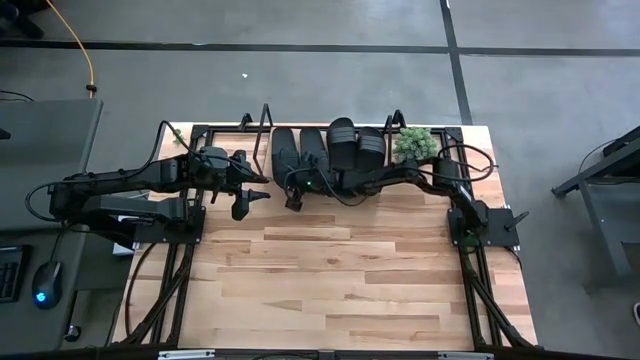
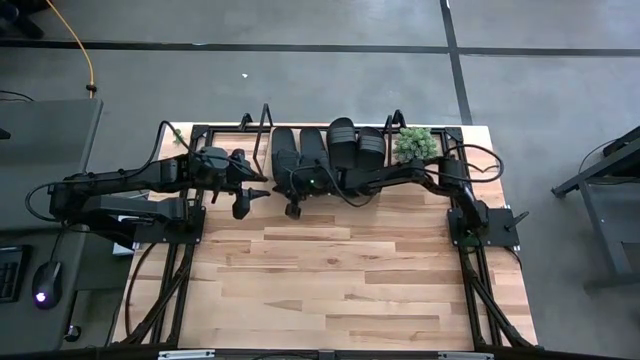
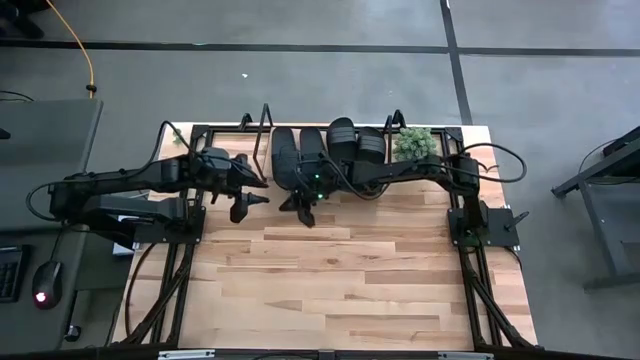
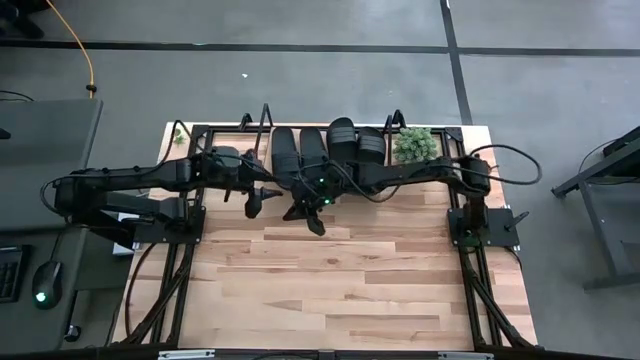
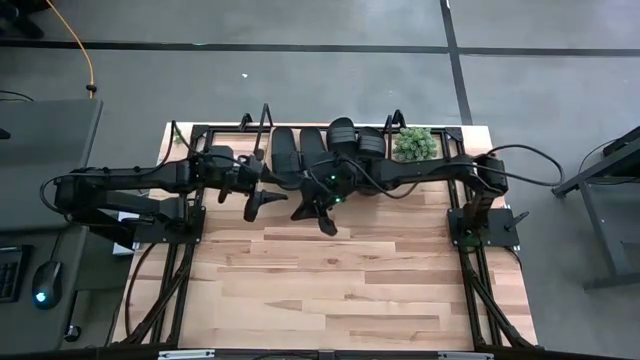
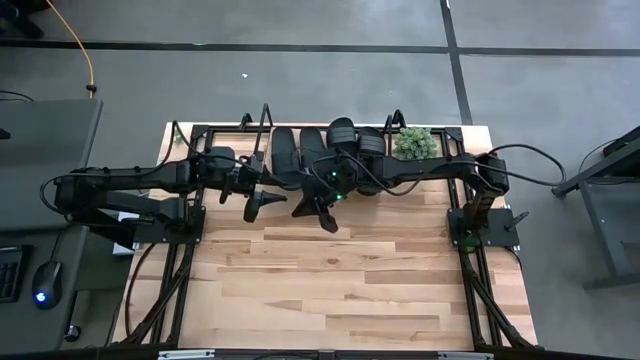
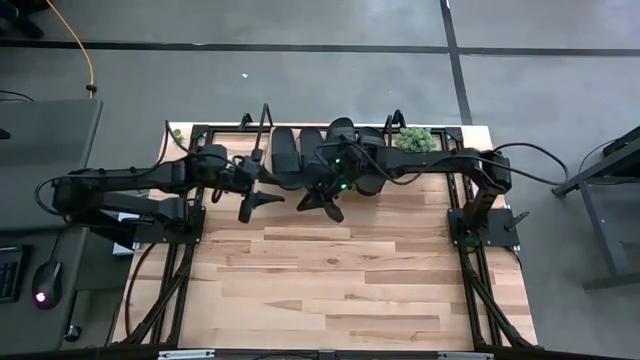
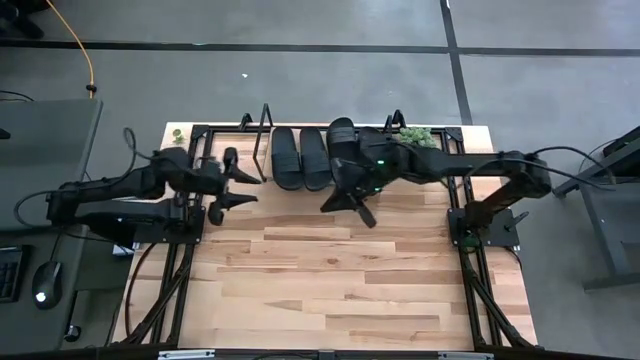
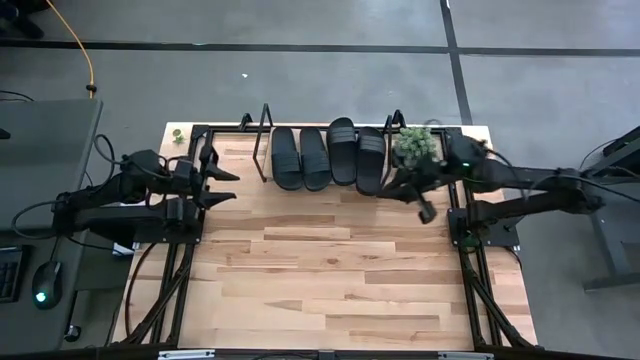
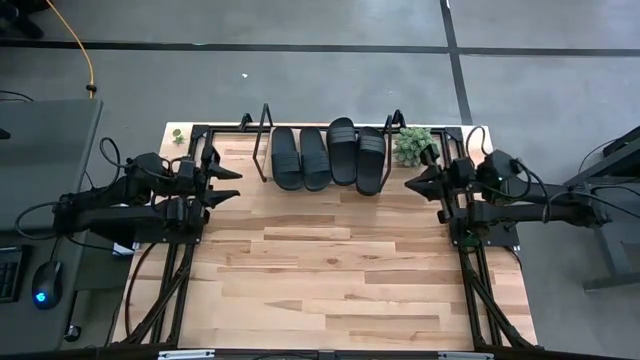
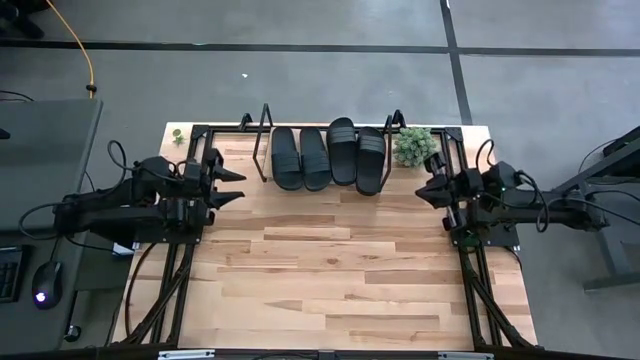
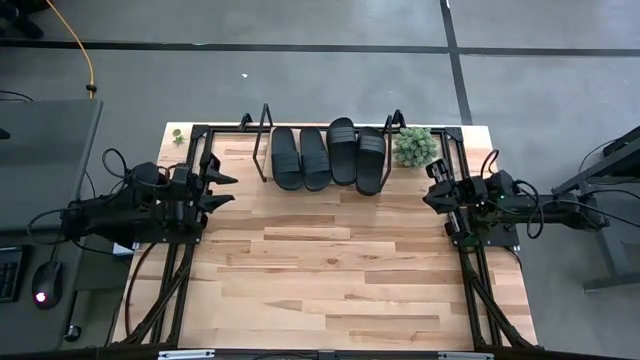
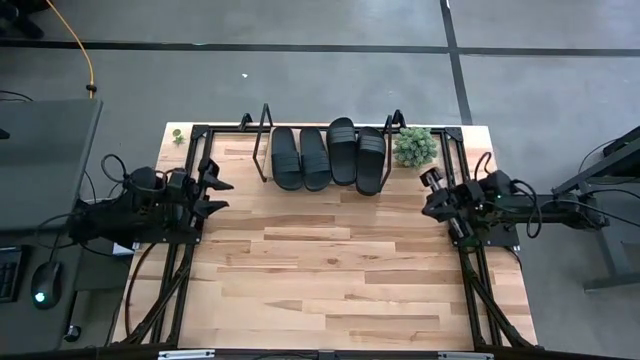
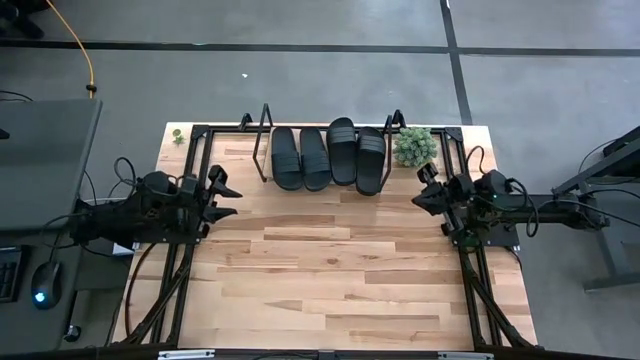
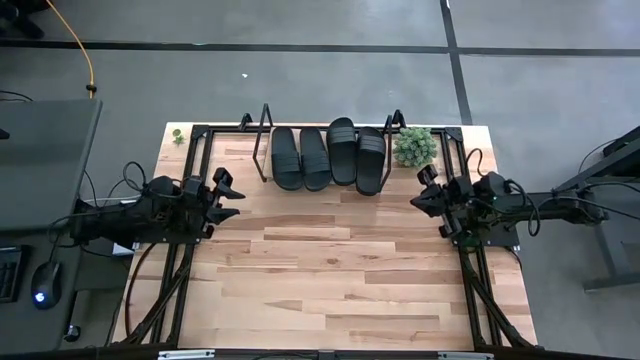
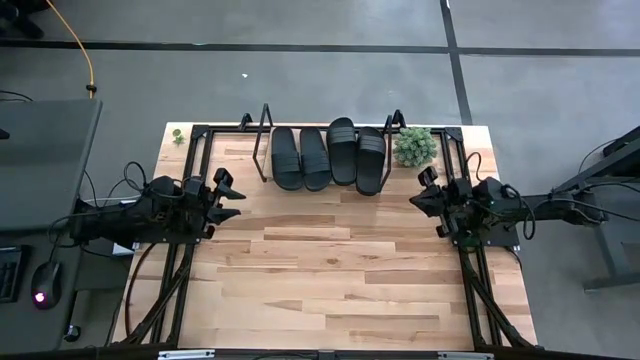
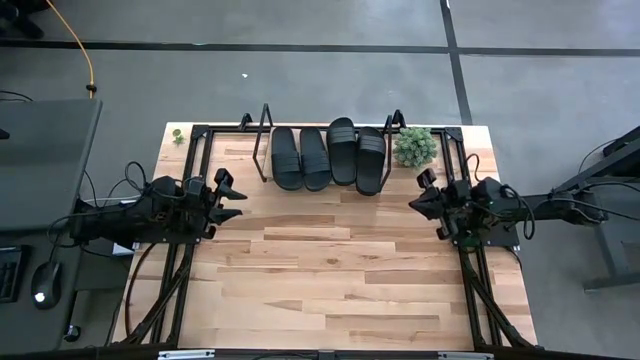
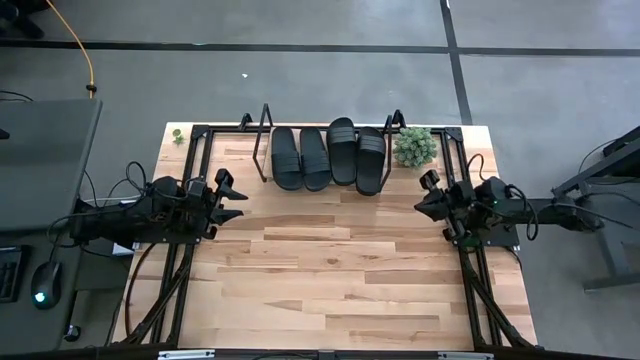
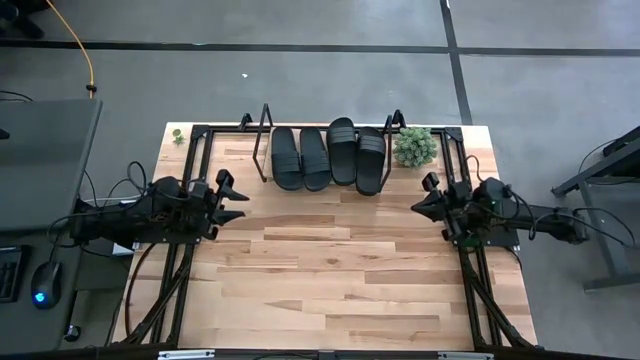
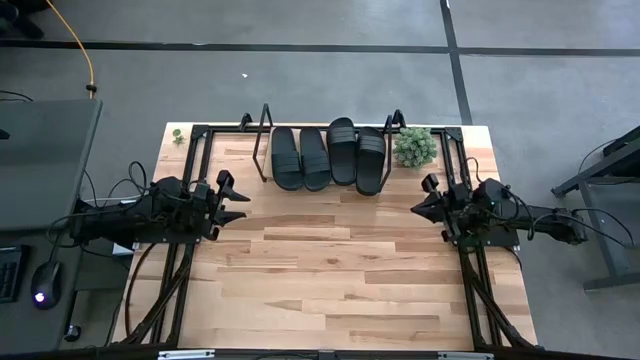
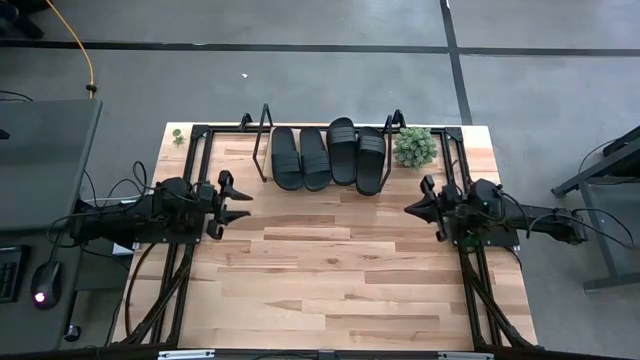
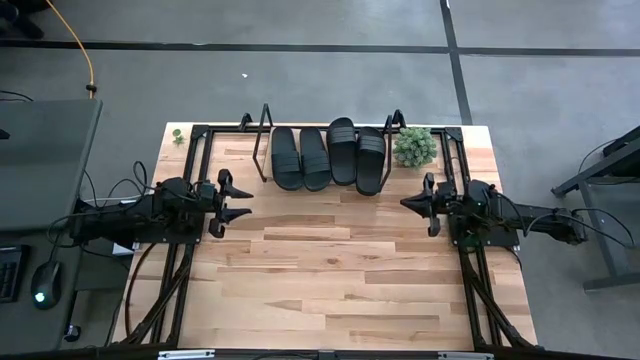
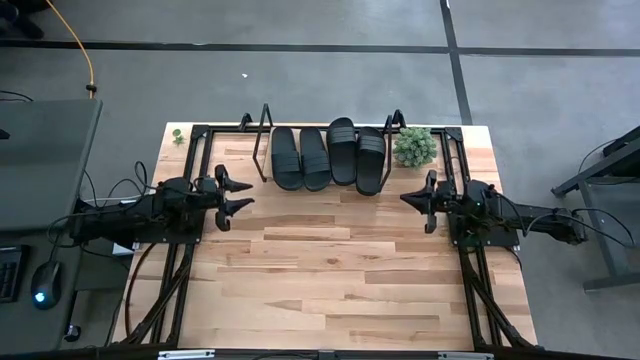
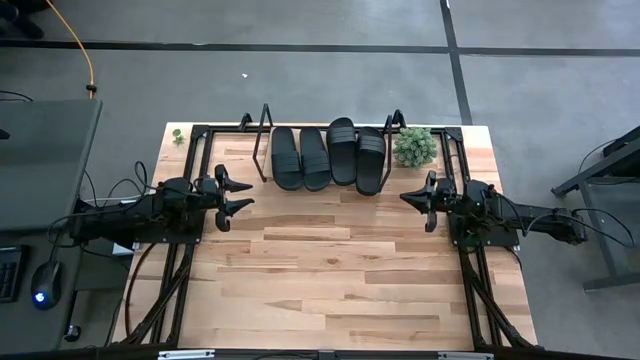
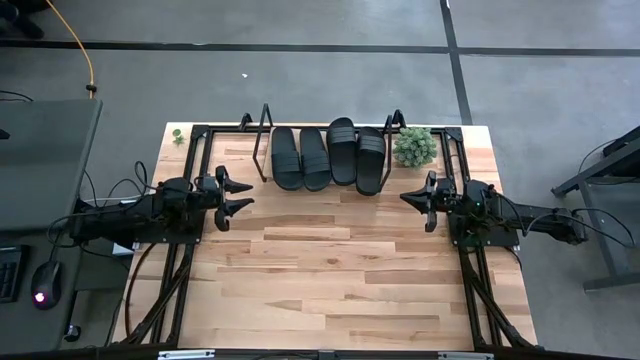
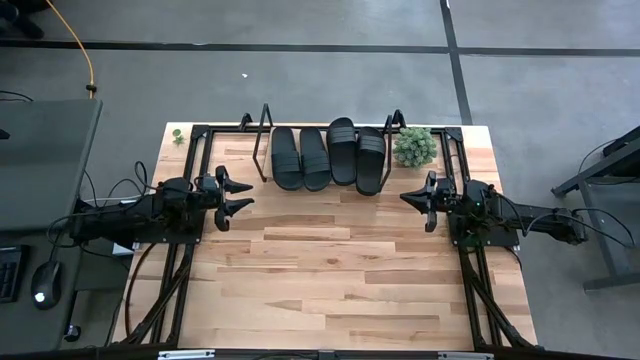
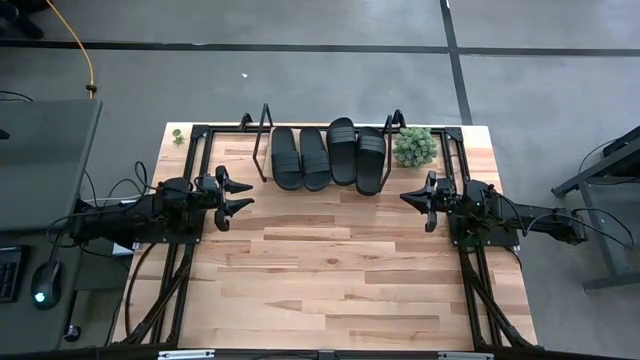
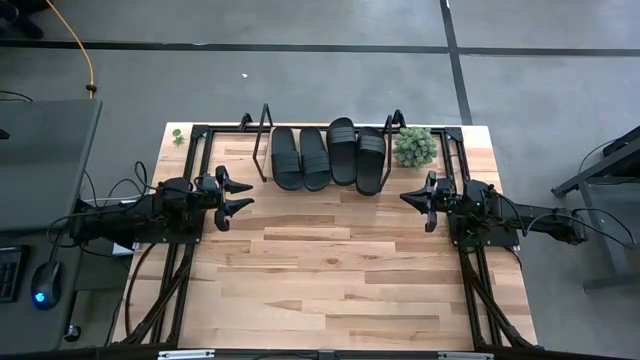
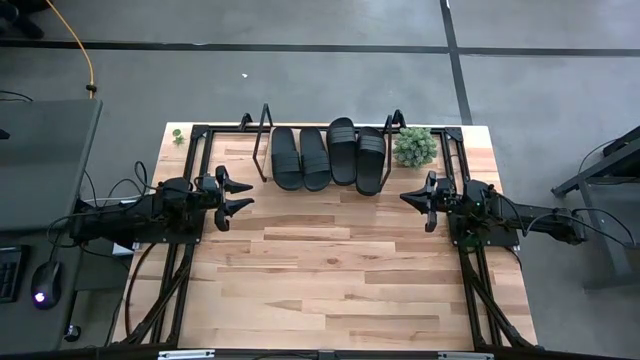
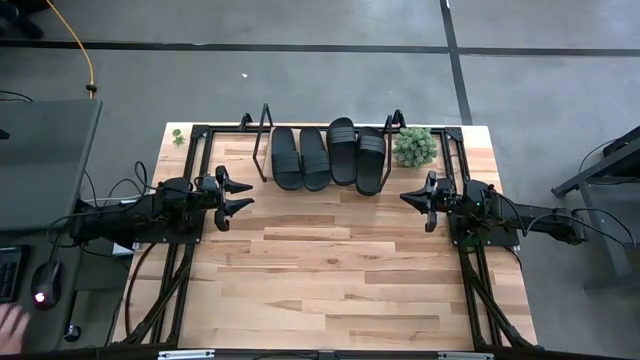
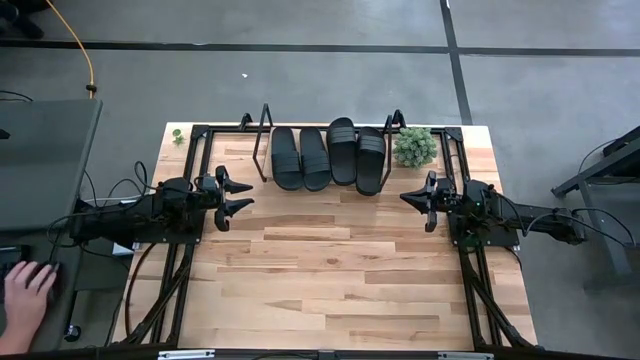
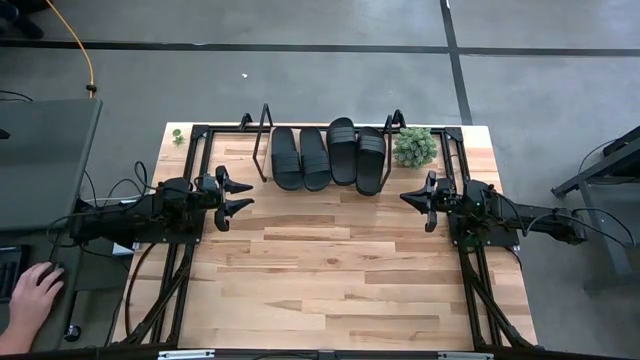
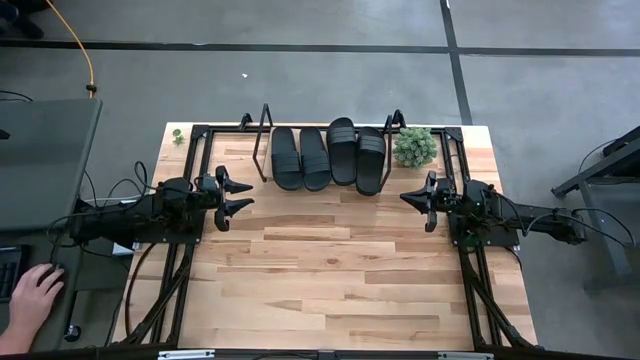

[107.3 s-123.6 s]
Task: Pick and place slides into the shelf
Return to Home Position

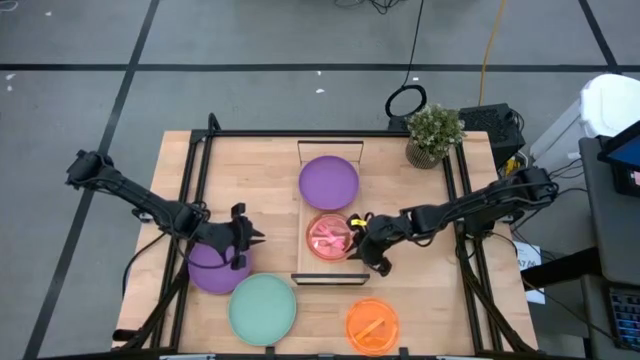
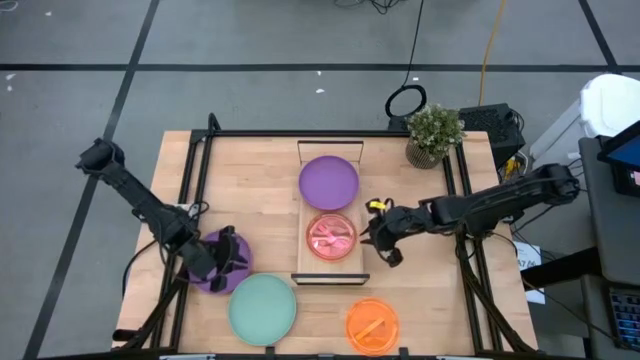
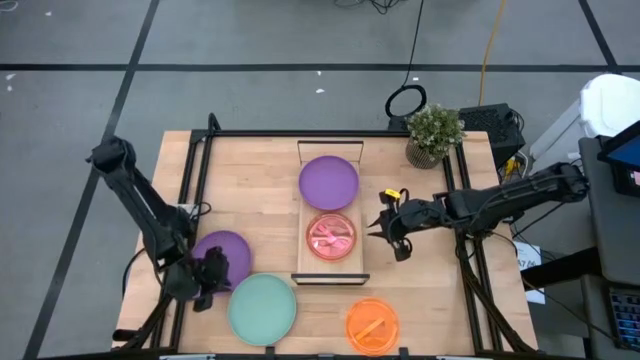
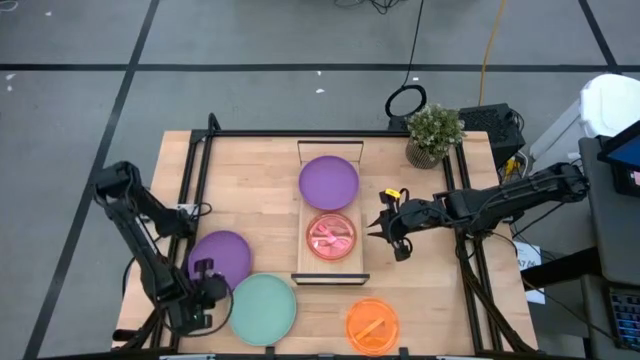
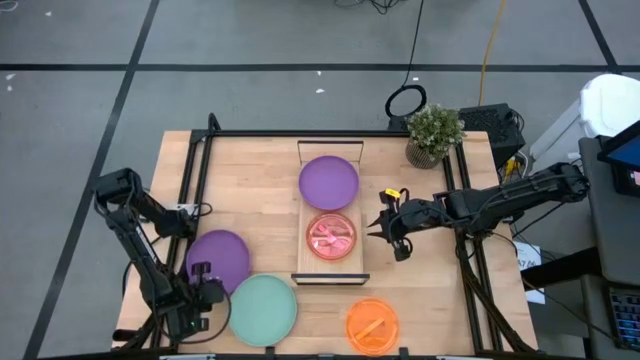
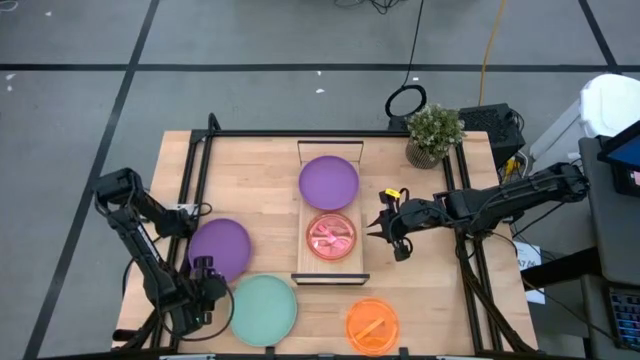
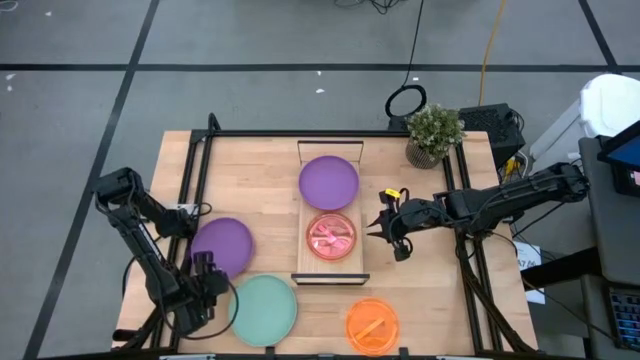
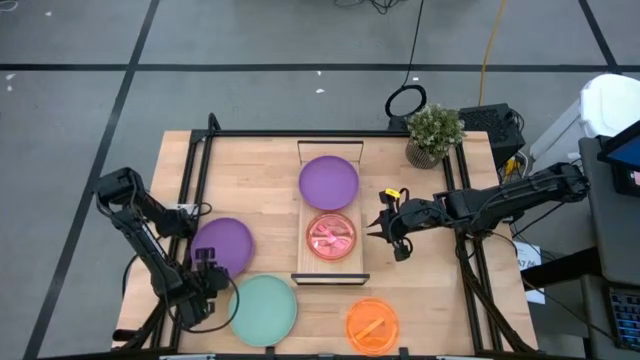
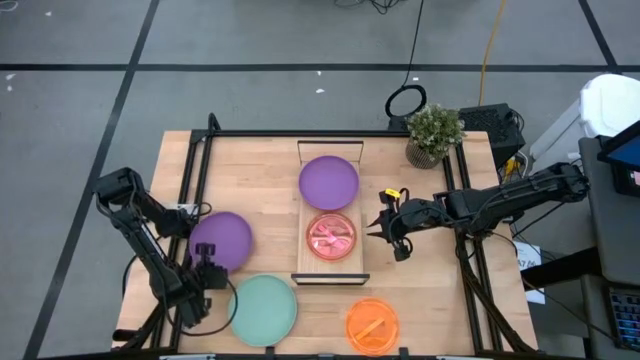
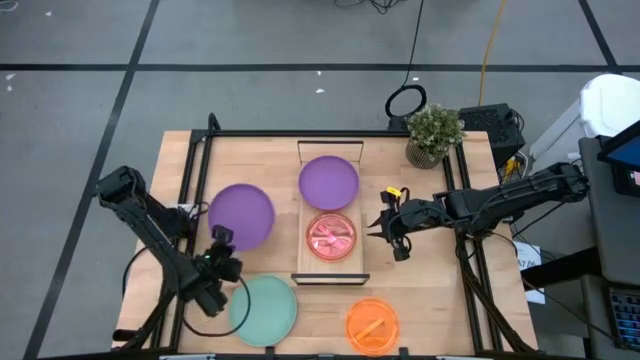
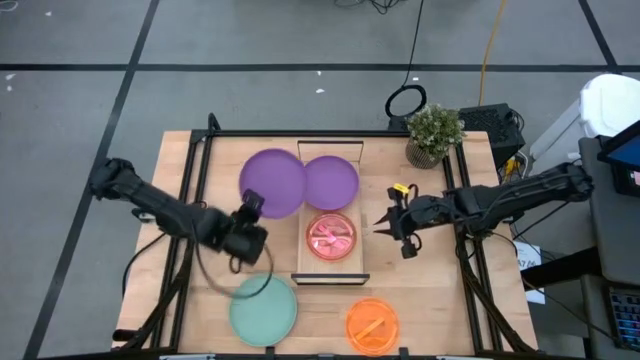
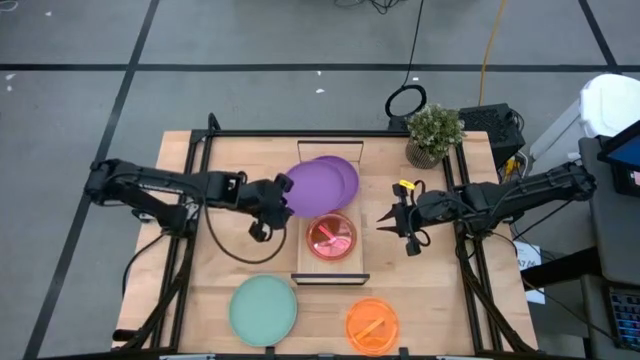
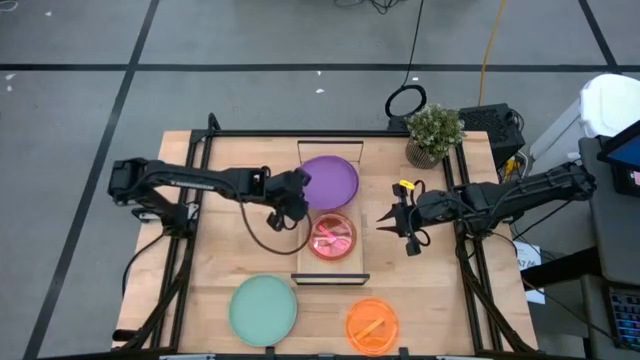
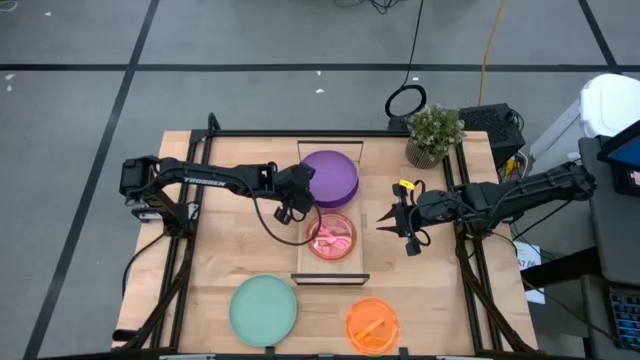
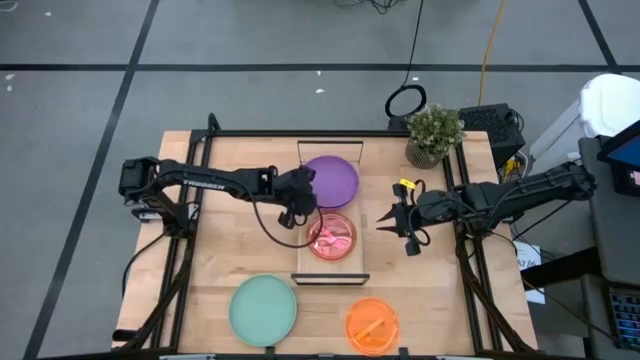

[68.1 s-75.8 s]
Task: Place and stack plates onto a shelf
Stack the purple plate on top of the purple plate on the shelf
